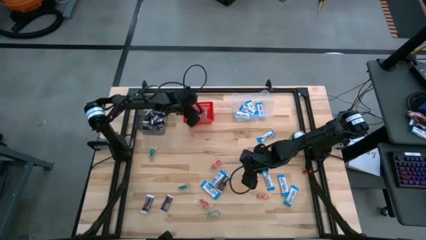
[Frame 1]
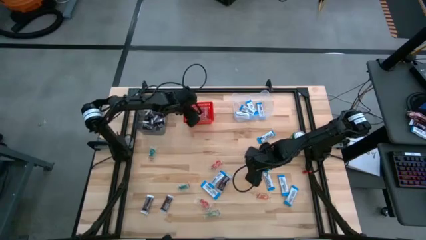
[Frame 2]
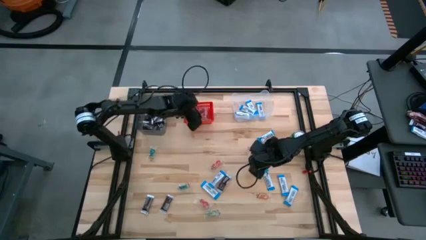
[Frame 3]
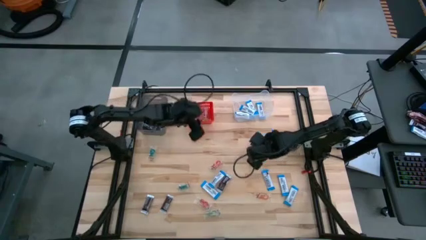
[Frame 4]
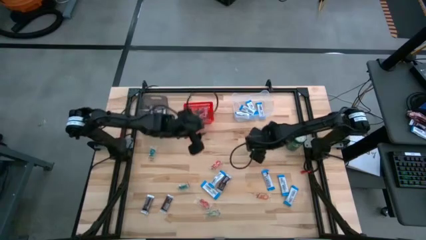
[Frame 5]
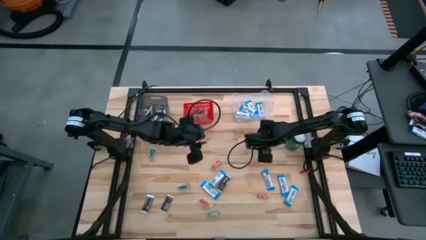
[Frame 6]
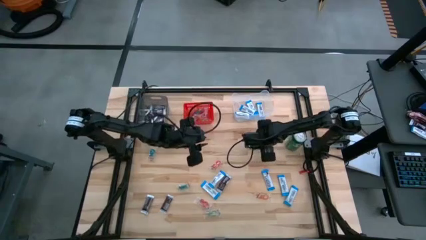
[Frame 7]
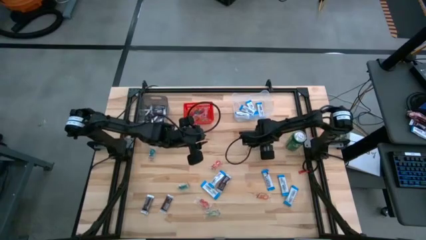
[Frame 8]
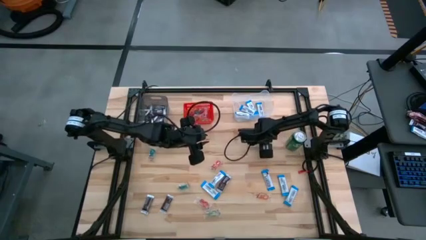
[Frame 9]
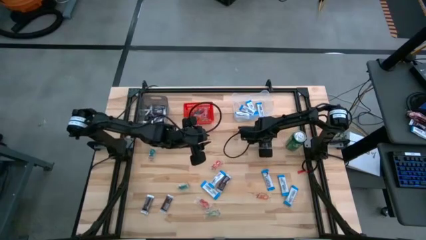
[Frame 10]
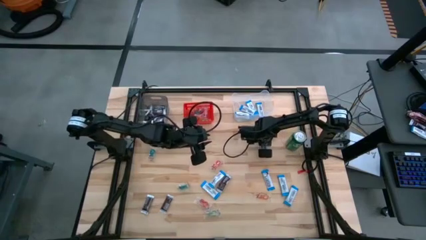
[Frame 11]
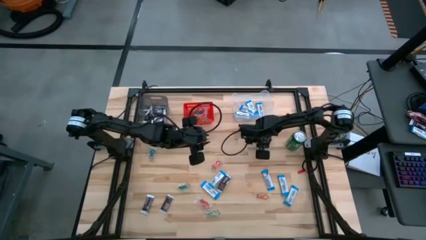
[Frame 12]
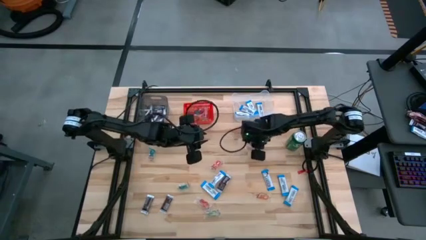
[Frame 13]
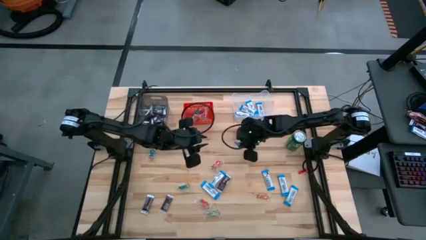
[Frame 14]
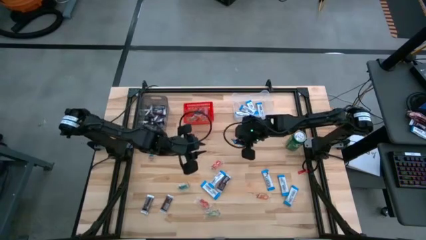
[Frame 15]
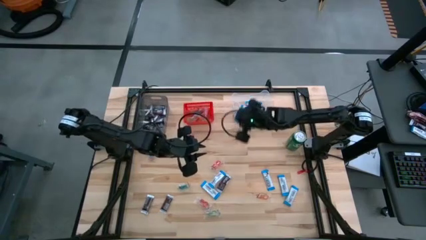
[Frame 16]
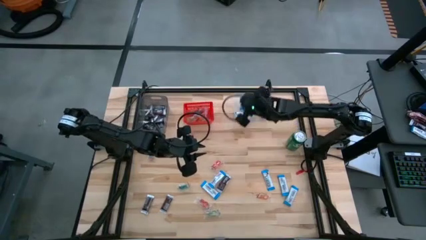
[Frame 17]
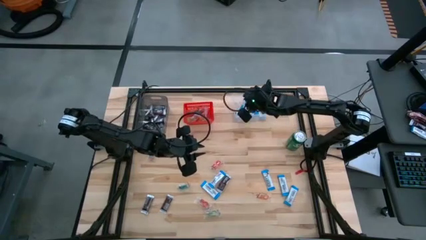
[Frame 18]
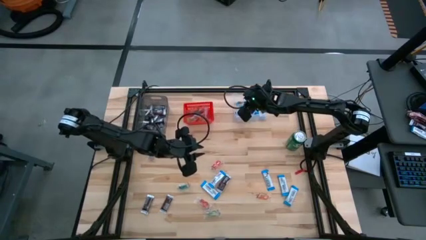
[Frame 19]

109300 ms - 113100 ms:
Task: Sort candy
Put the white chocolate into the transparent bin

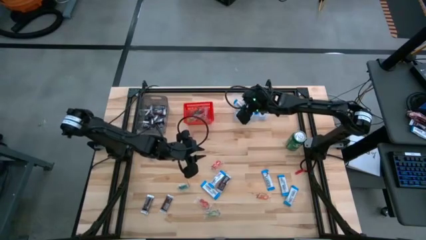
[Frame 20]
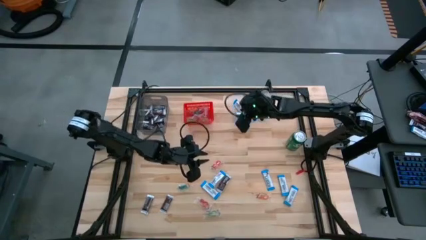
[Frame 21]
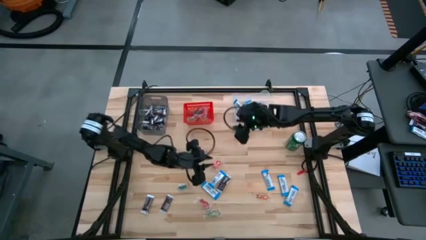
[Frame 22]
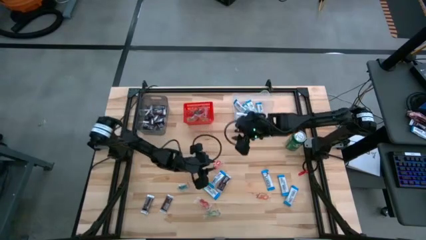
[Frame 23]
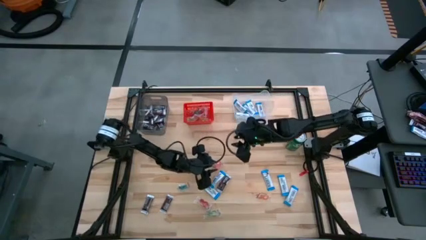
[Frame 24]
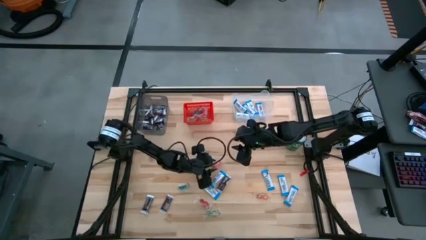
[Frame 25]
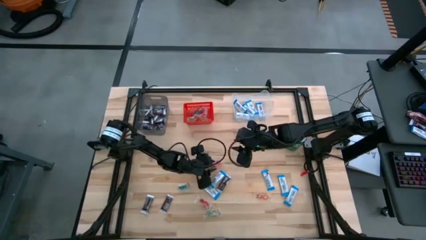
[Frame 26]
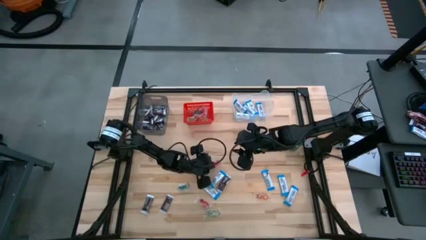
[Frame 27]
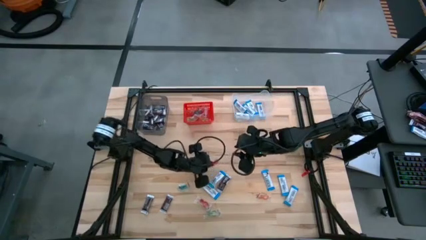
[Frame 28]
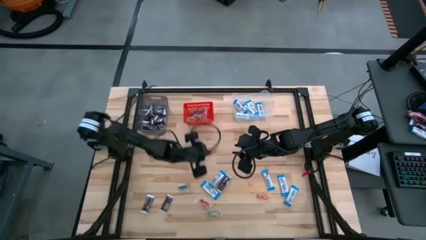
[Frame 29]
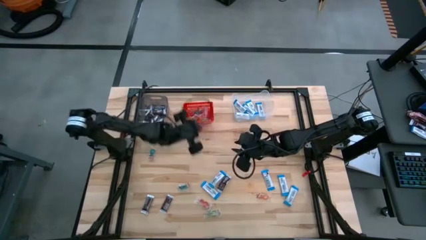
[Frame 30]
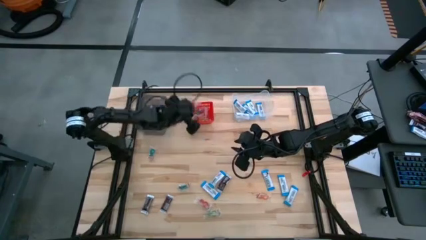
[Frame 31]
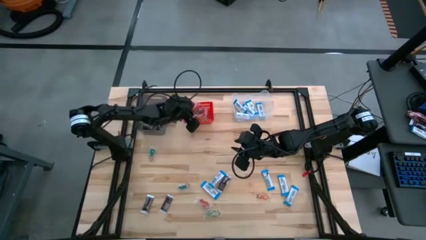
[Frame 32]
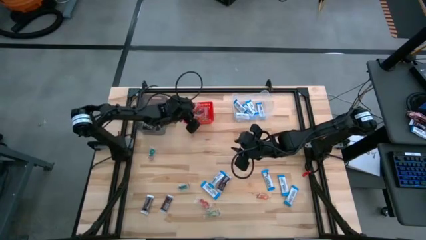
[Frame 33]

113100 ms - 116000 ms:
Put the orange gummy into the red bin

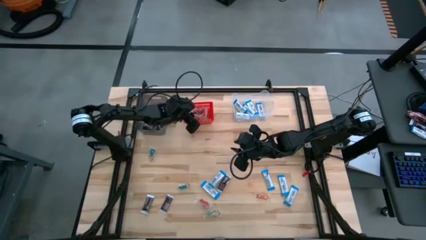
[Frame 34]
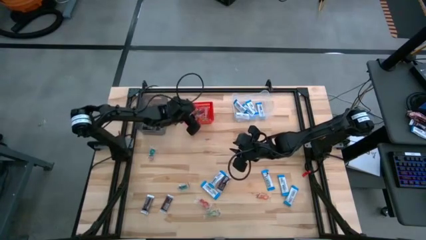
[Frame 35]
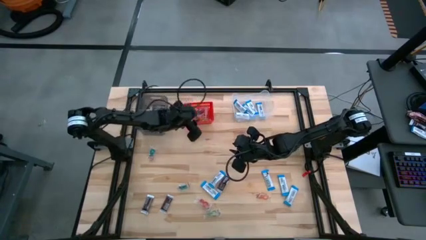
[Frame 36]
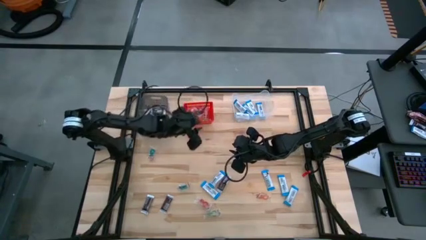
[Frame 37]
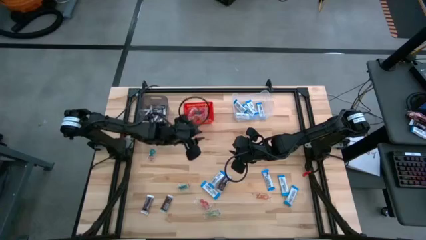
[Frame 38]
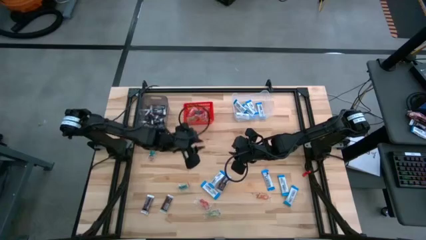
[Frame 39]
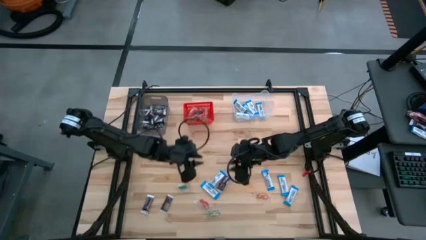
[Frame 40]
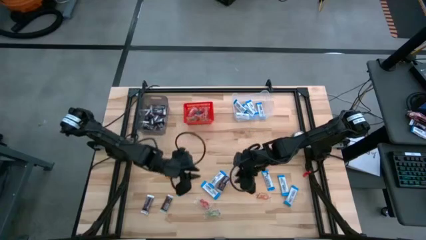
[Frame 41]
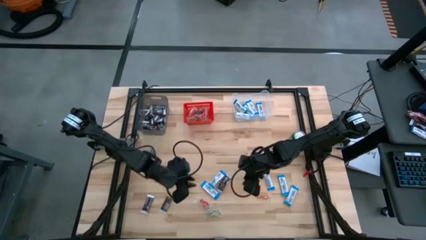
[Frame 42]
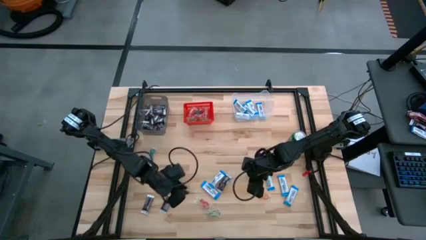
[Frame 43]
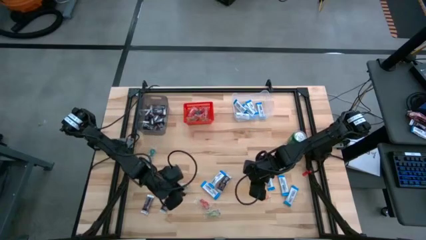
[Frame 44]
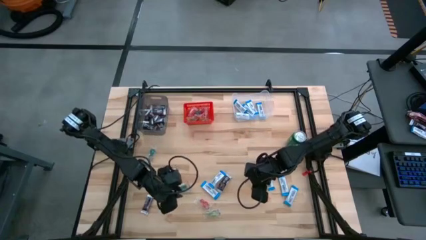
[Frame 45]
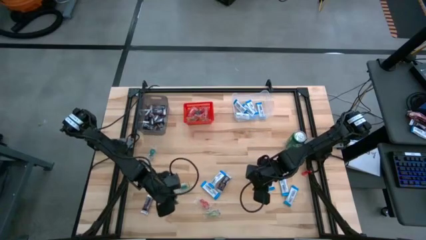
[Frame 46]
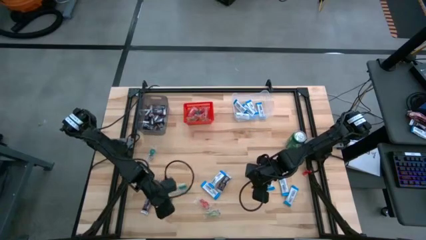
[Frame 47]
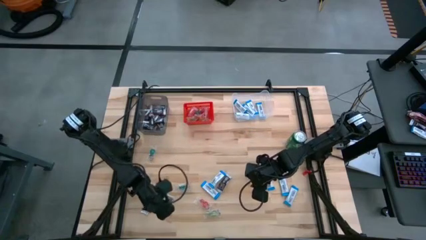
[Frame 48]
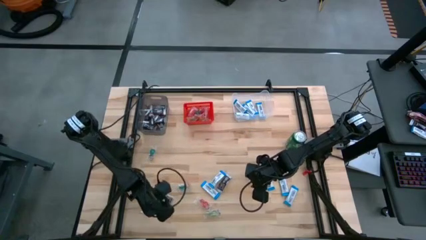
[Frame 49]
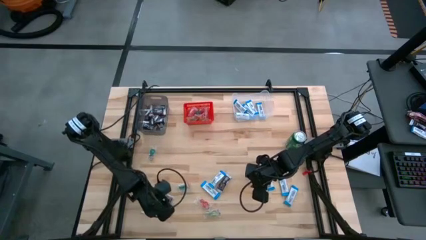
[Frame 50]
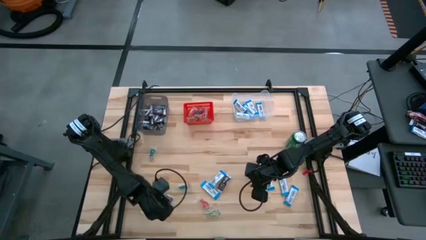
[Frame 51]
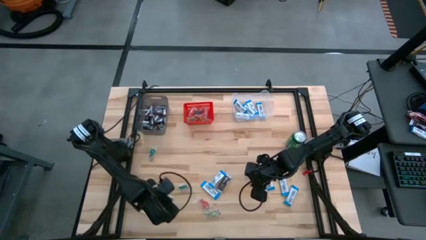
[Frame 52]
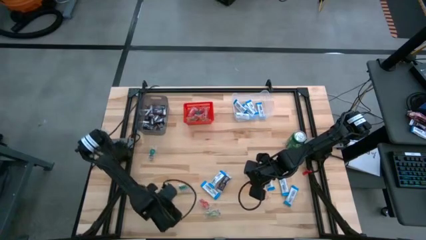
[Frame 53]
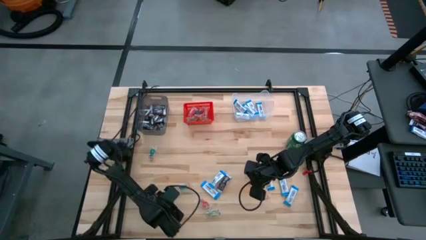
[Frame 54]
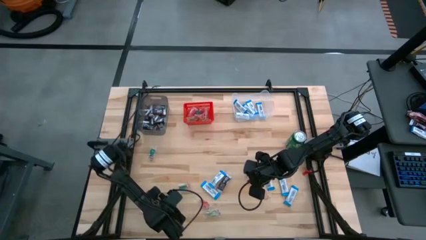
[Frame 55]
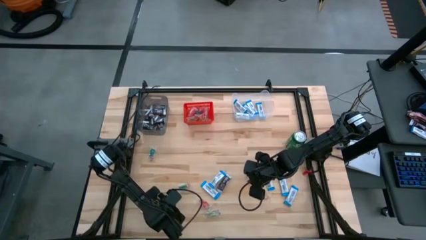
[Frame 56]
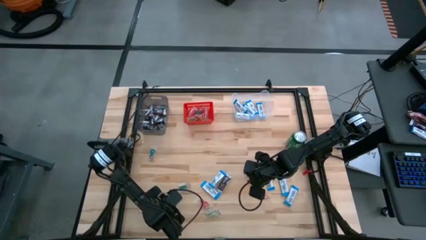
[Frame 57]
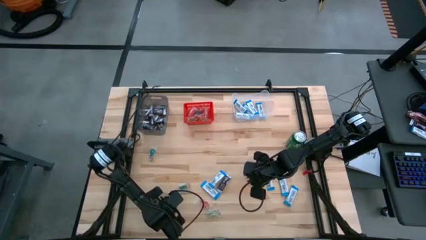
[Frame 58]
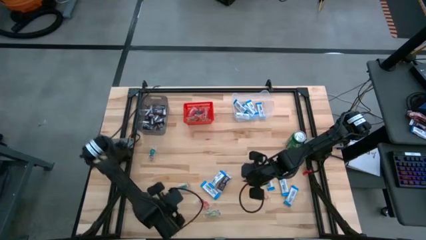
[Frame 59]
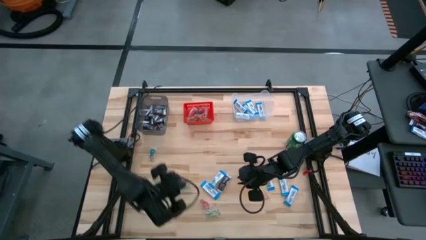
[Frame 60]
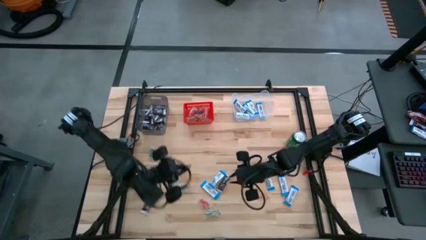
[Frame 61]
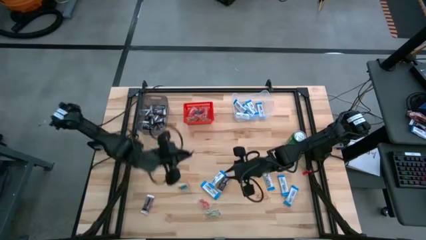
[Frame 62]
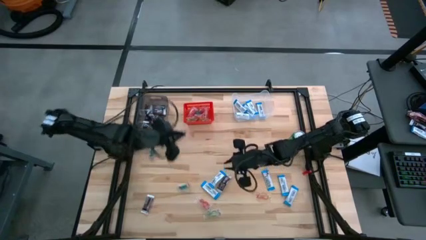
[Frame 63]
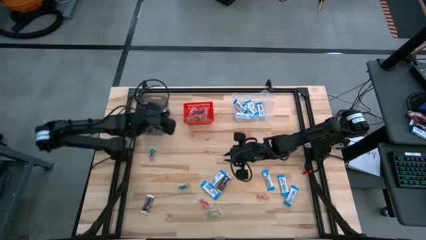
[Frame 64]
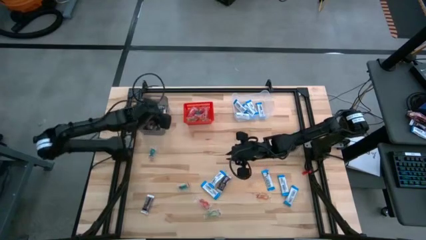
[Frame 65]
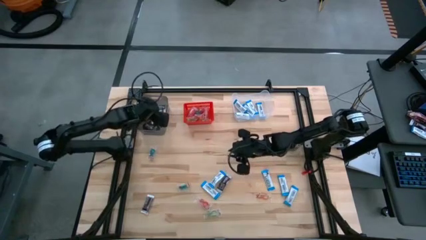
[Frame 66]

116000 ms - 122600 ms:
Put the brown chocolate into the black bin

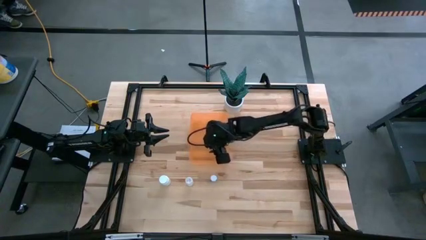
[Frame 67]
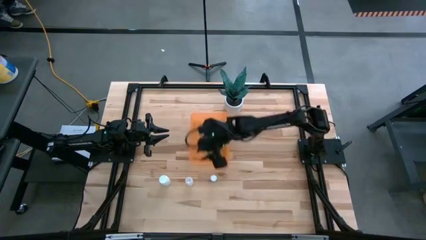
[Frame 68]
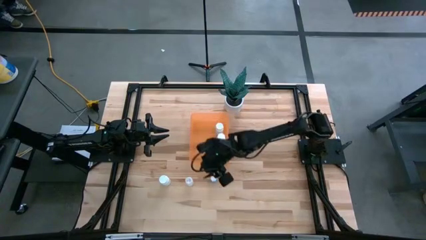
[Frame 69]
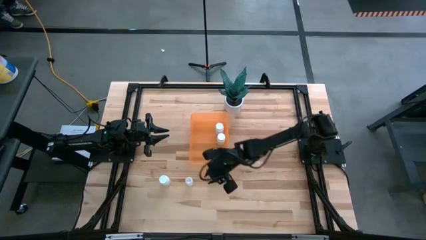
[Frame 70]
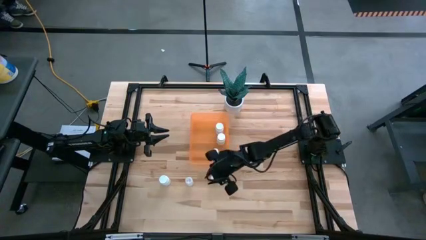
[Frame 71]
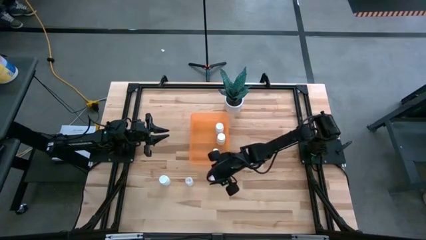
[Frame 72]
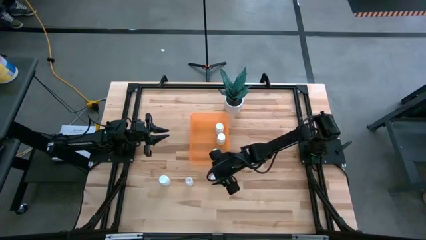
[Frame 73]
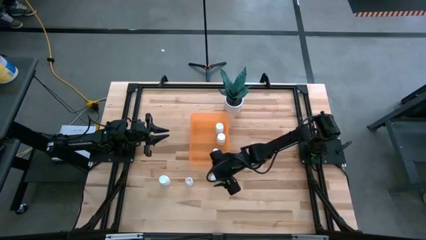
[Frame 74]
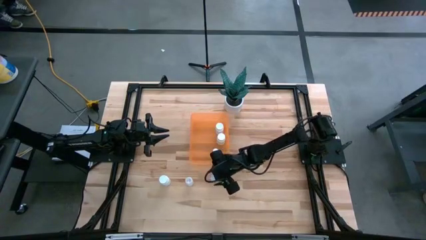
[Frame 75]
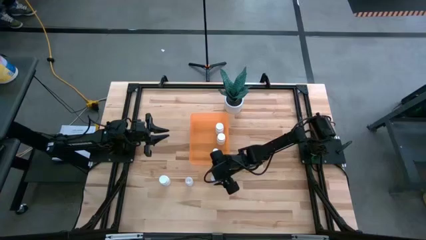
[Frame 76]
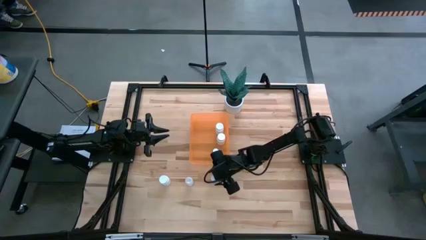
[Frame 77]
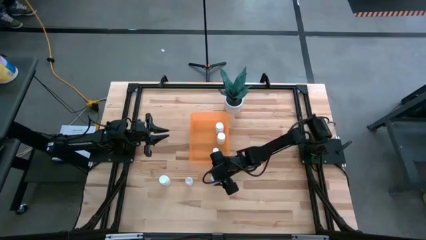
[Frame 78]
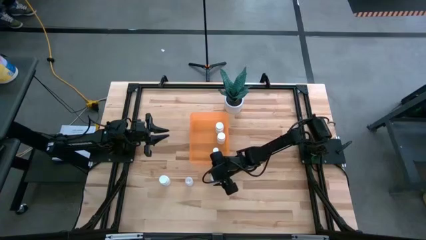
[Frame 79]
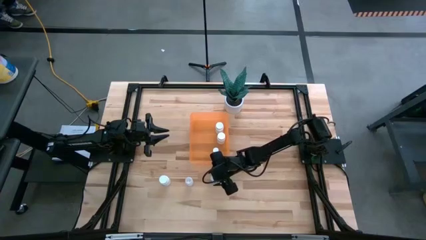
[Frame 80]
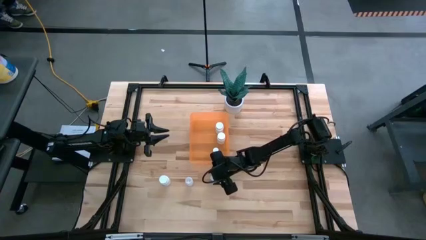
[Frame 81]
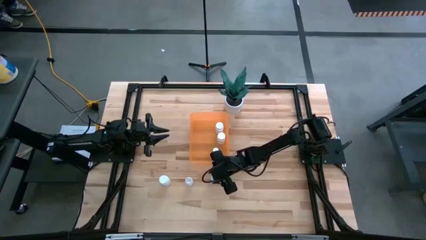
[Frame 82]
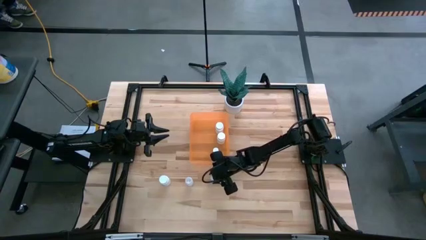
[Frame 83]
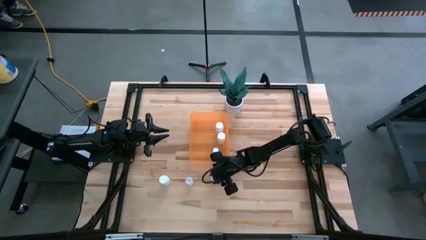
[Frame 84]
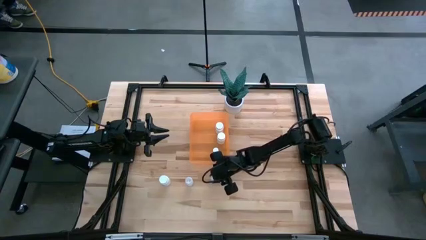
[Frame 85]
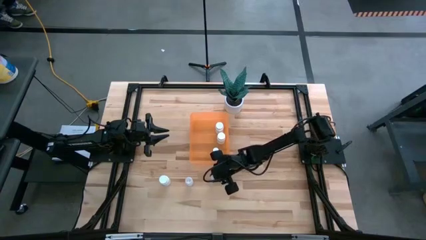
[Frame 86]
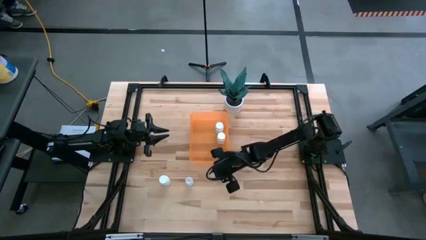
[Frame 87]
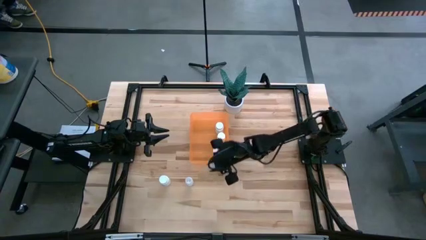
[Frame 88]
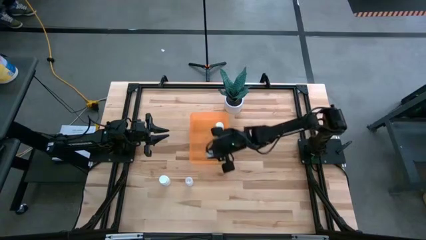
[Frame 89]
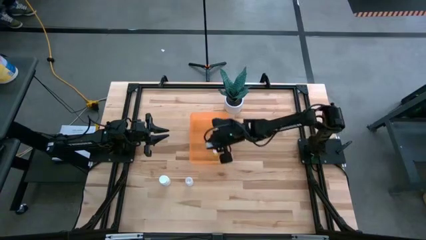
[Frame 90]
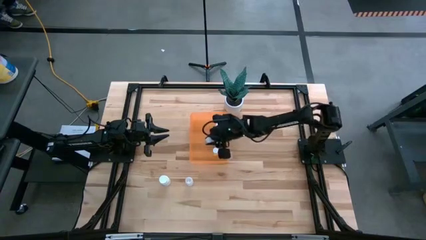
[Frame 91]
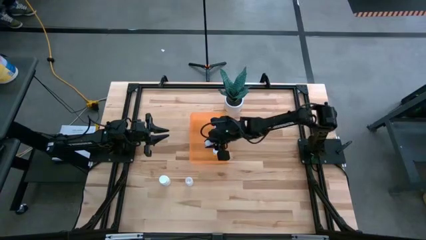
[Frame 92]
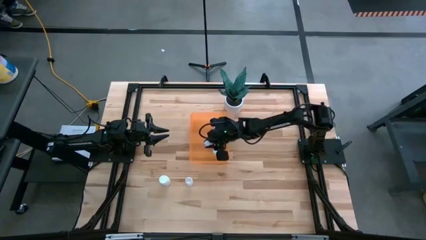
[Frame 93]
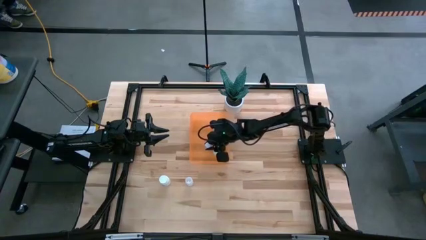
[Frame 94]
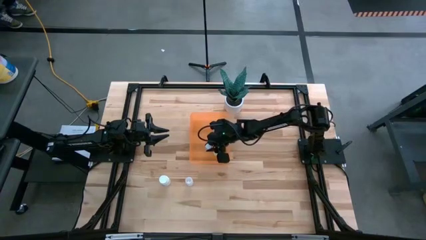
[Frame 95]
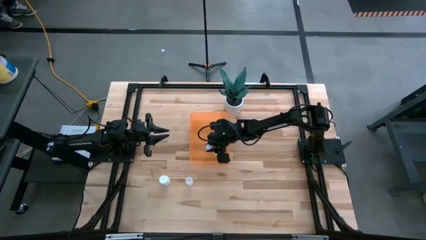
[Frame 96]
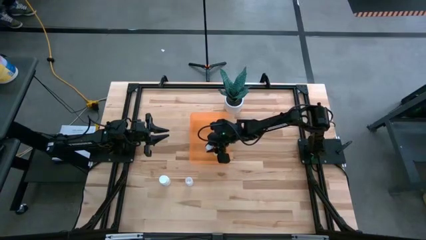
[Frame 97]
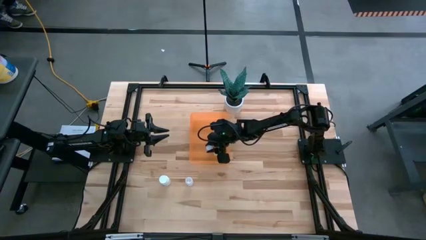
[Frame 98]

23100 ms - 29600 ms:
Task: Pick and place pill bottles into a basket
Put the blue pill bottle into the orange bin
